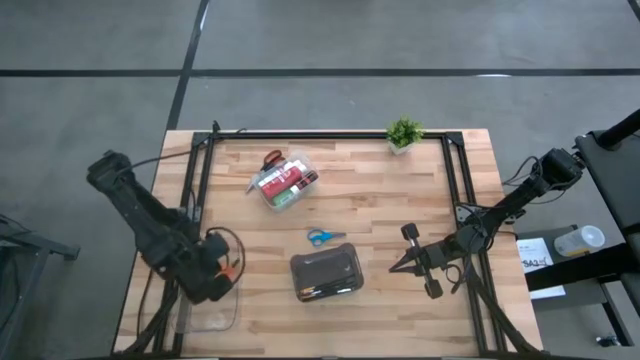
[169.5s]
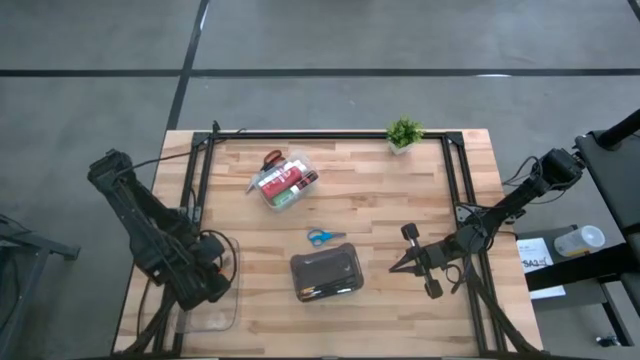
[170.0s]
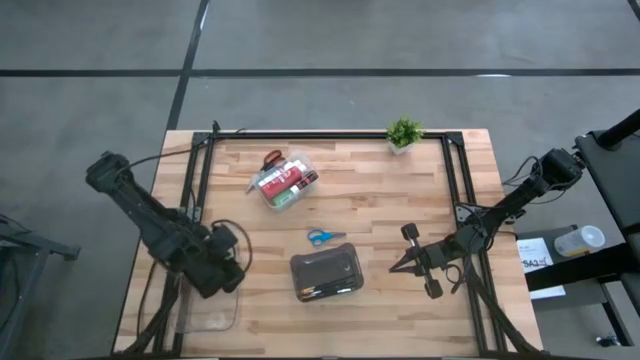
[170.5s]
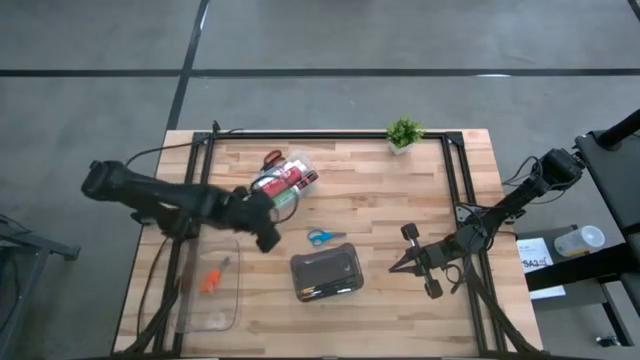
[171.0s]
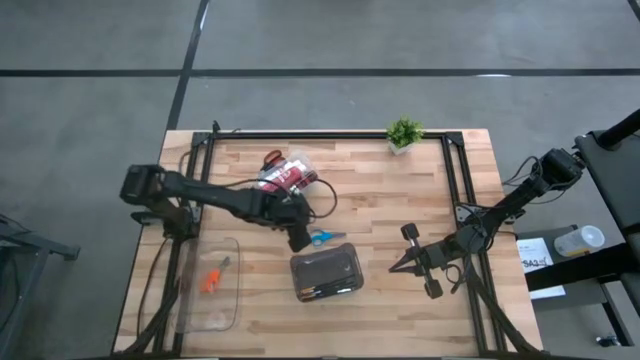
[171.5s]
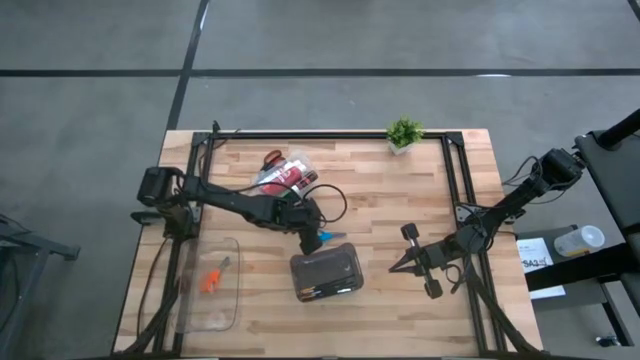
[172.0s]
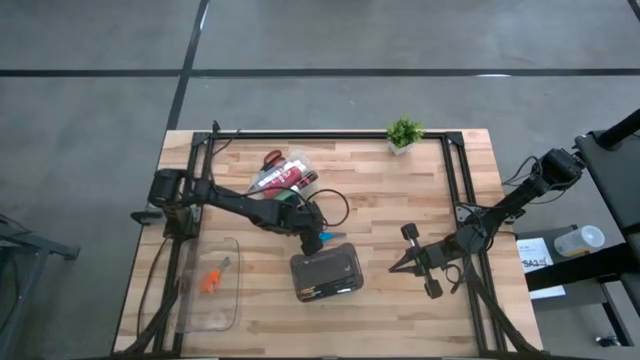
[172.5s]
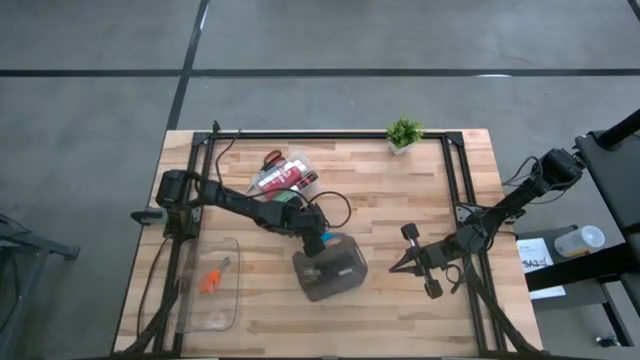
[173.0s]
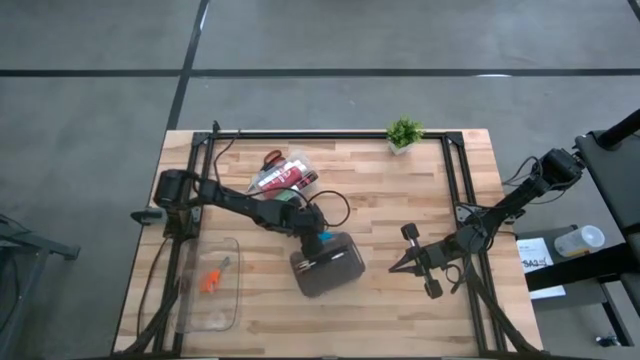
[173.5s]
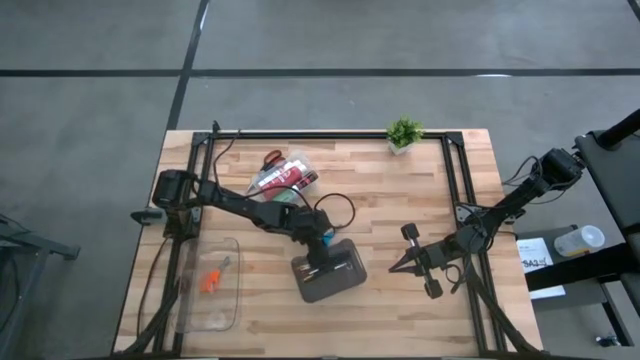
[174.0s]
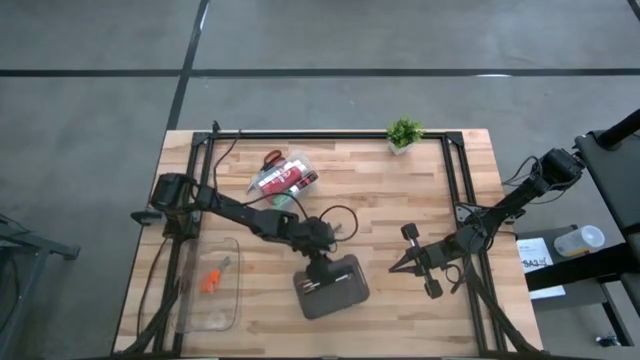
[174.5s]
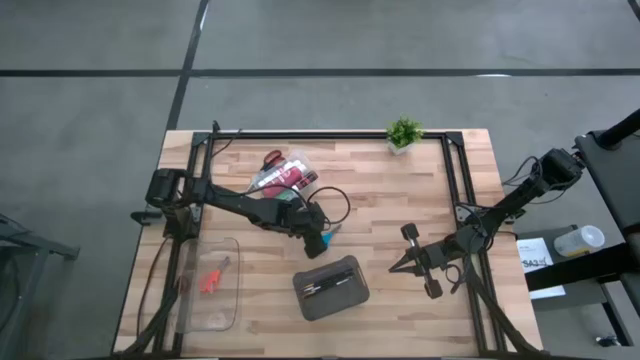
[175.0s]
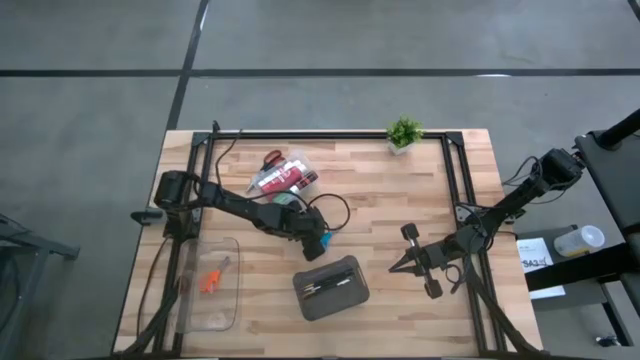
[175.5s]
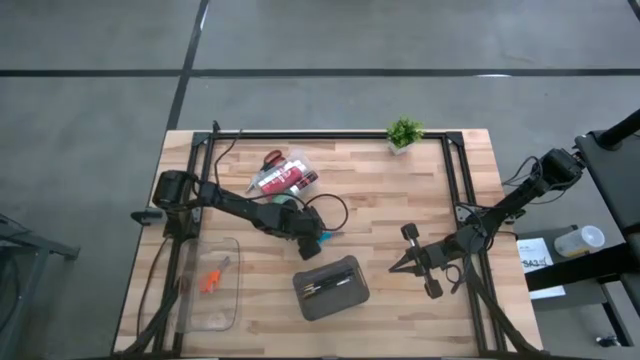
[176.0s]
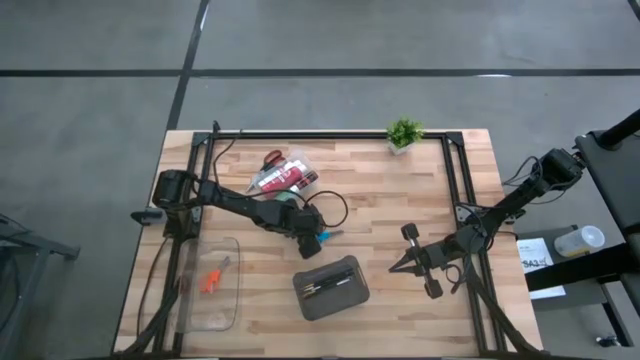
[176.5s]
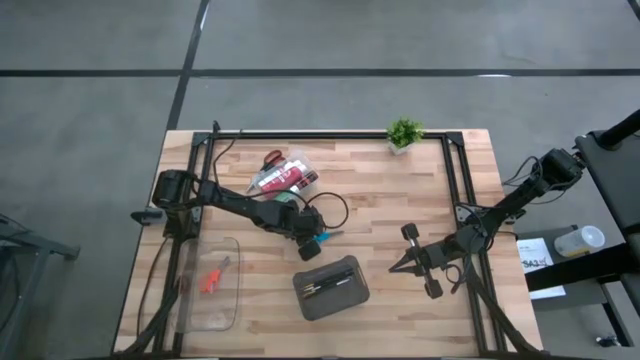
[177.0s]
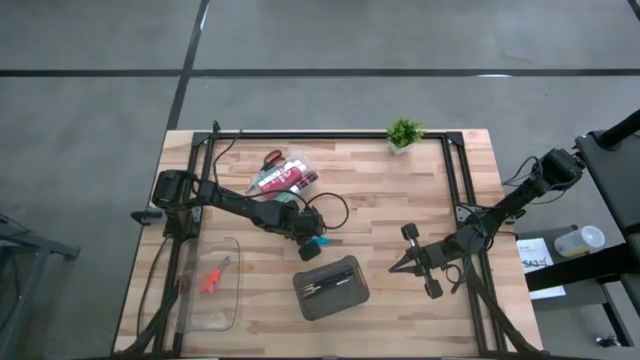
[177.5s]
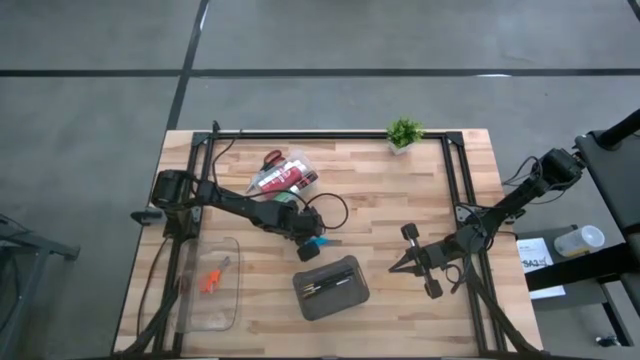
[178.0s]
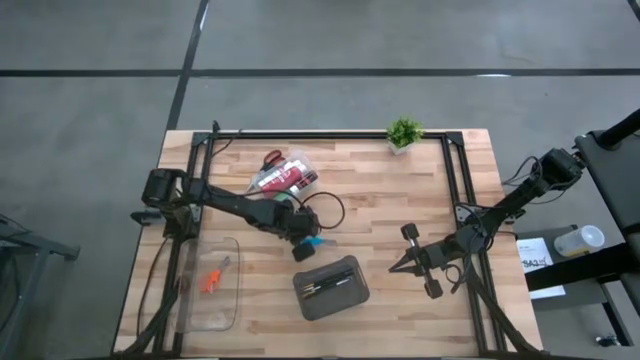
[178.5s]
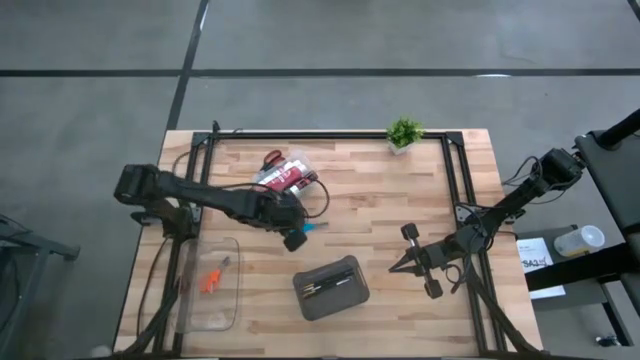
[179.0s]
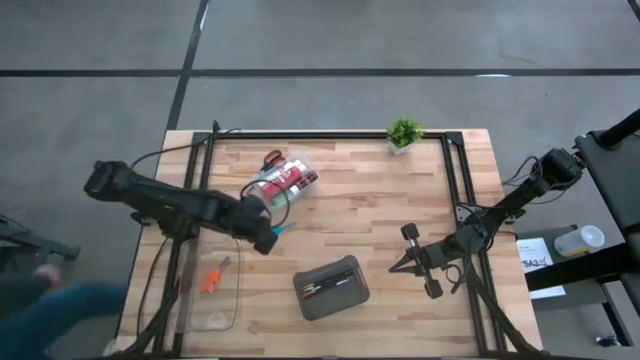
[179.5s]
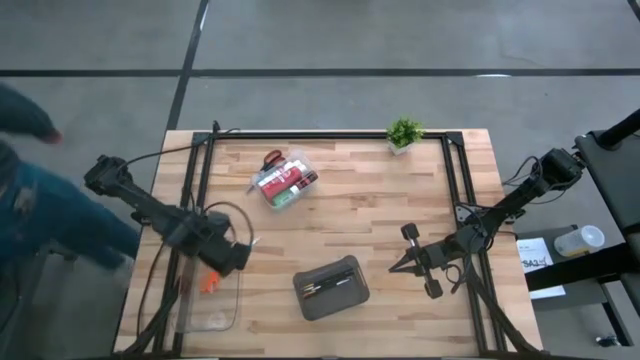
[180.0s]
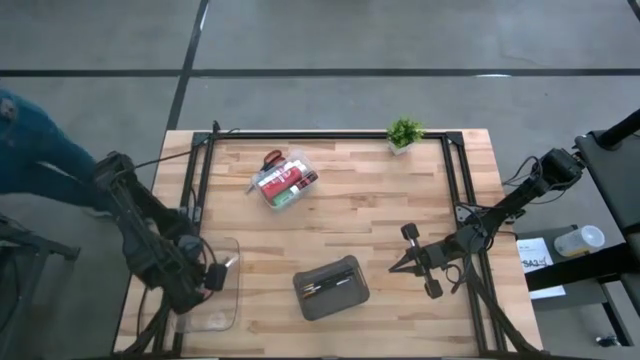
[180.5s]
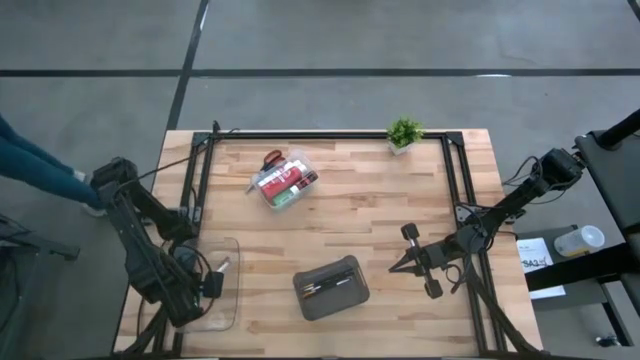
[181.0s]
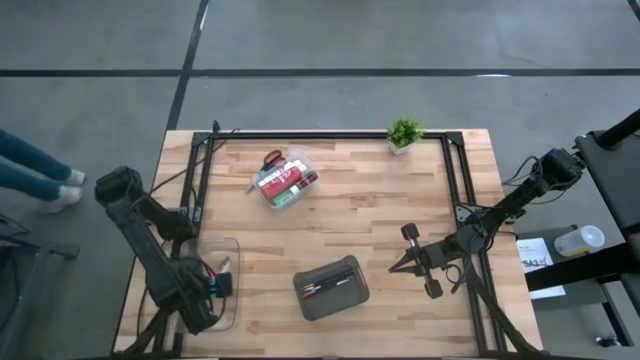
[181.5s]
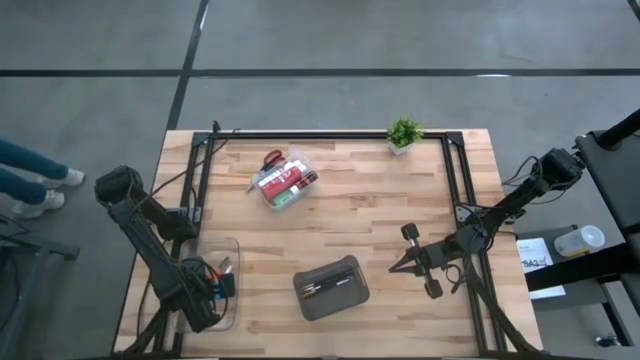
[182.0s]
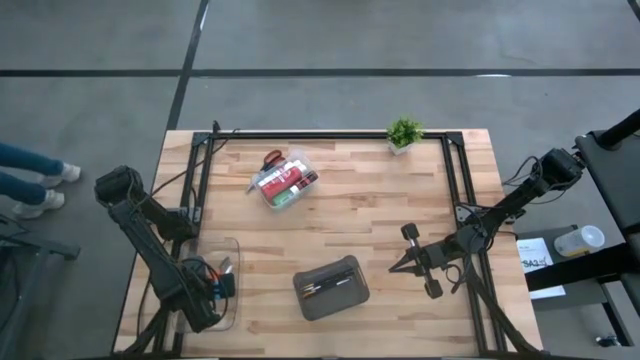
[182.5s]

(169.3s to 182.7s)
Task: Pick & Place Paint Supplies
Put the blue scissors into the bottom transparent bin

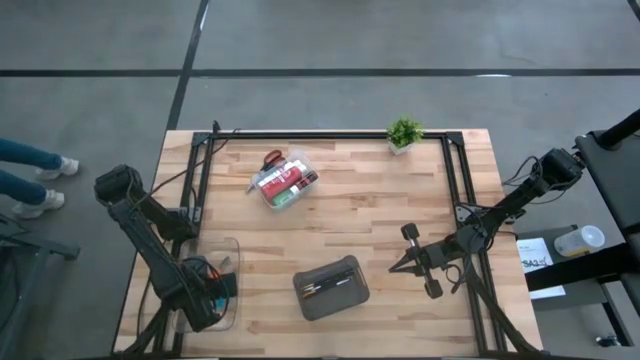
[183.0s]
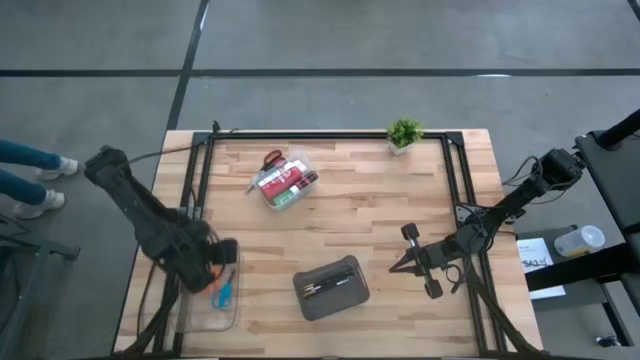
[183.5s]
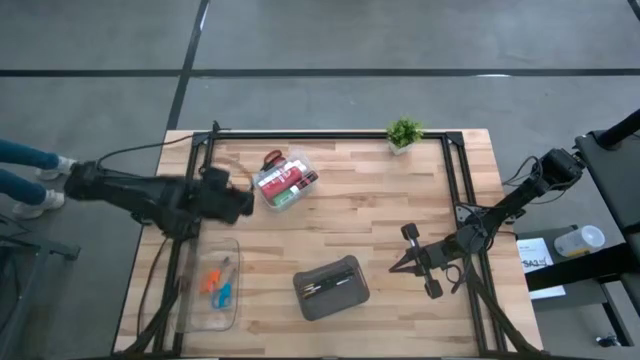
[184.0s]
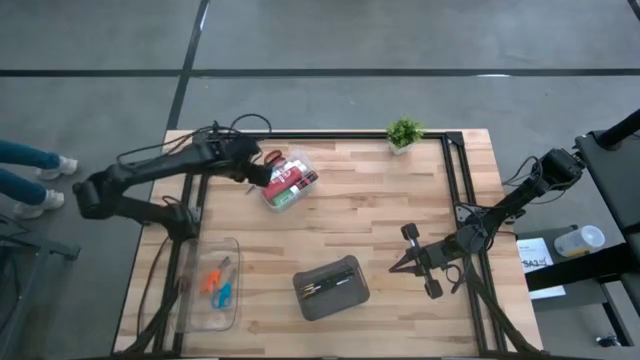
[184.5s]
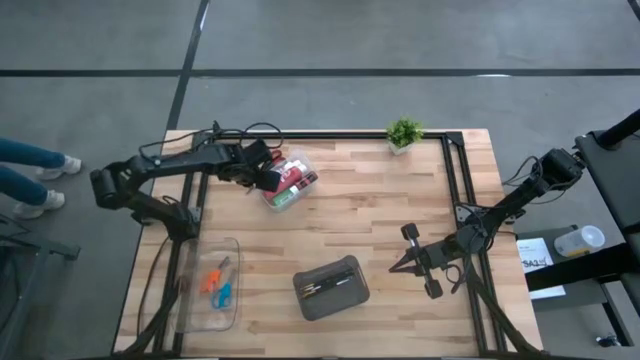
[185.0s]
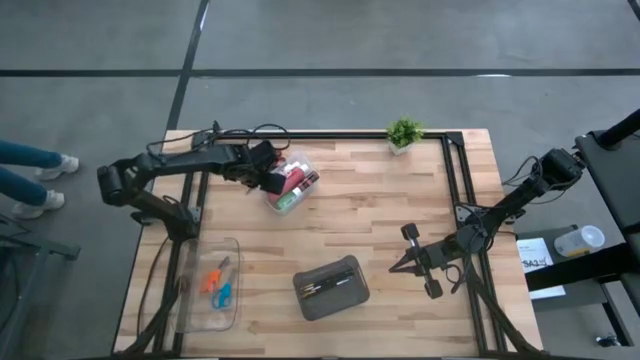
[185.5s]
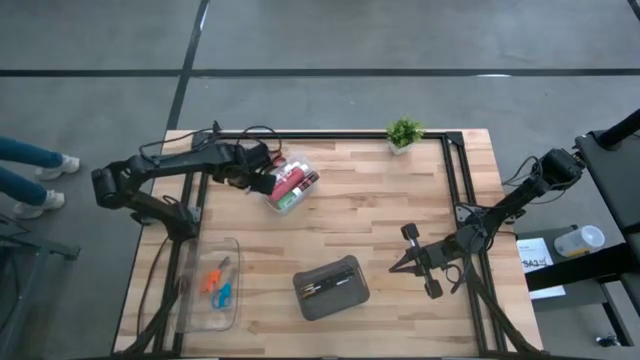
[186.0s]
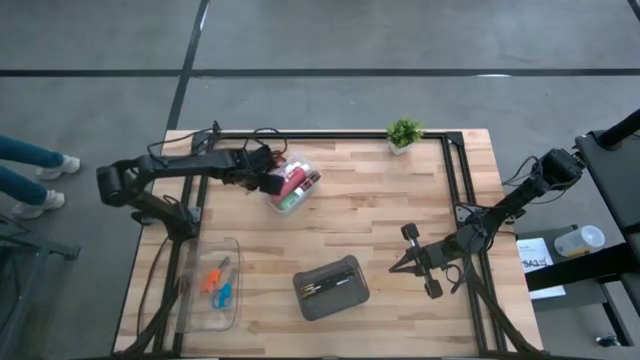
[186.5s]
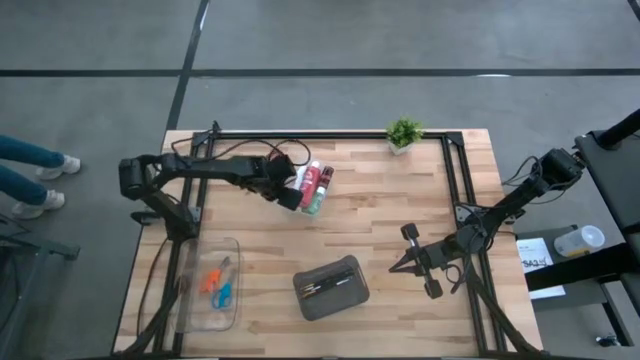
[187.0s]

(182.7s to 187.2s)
Adjust the top transparent bin on the table

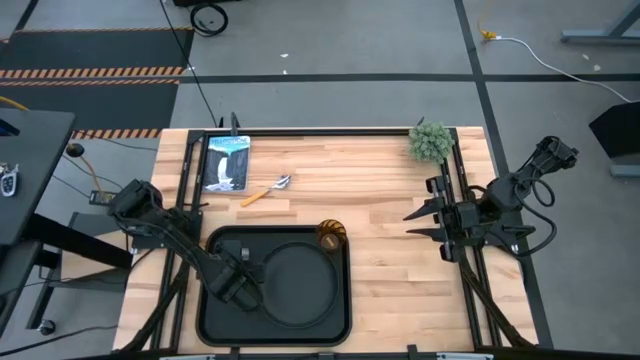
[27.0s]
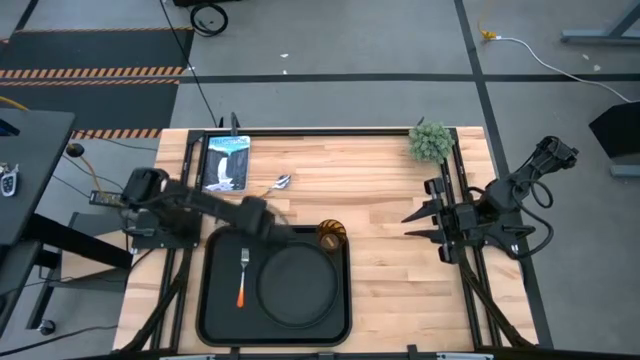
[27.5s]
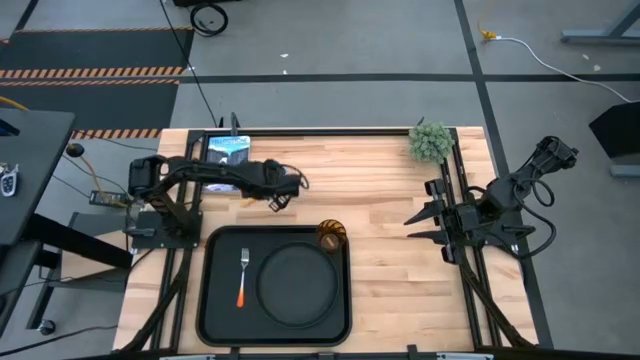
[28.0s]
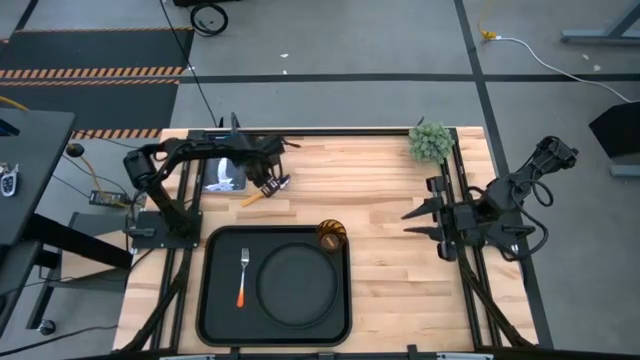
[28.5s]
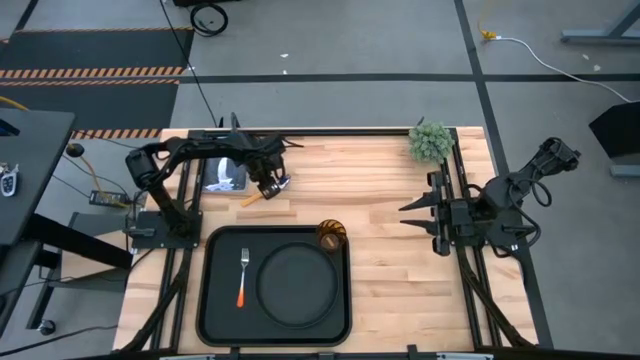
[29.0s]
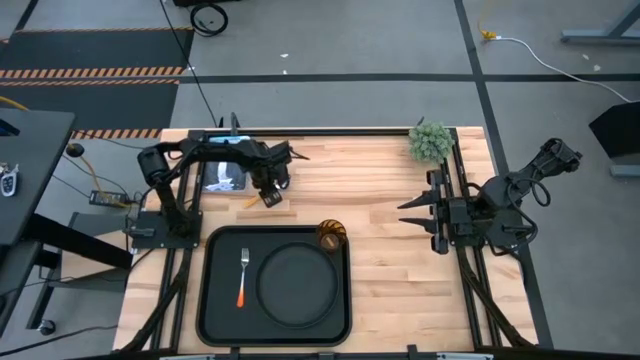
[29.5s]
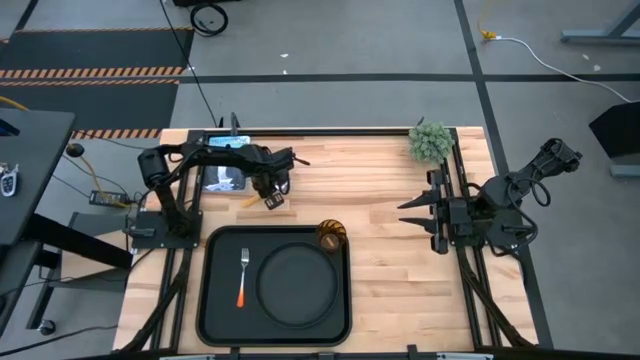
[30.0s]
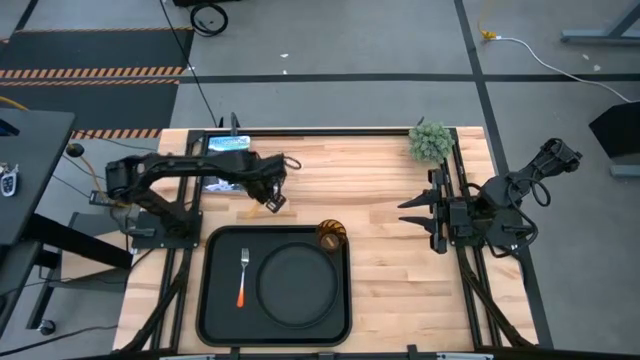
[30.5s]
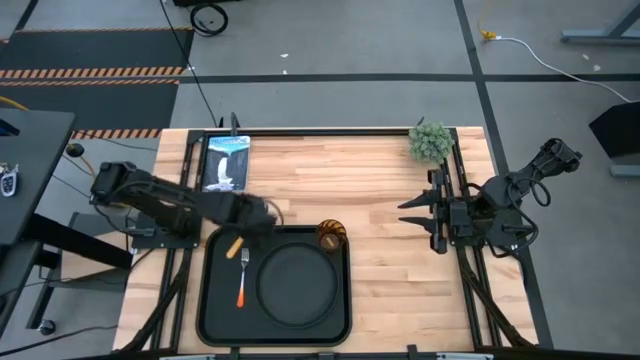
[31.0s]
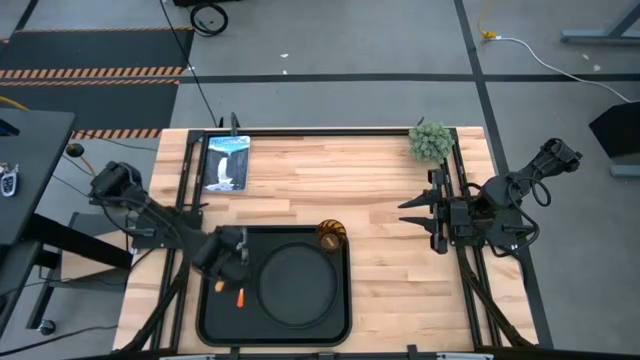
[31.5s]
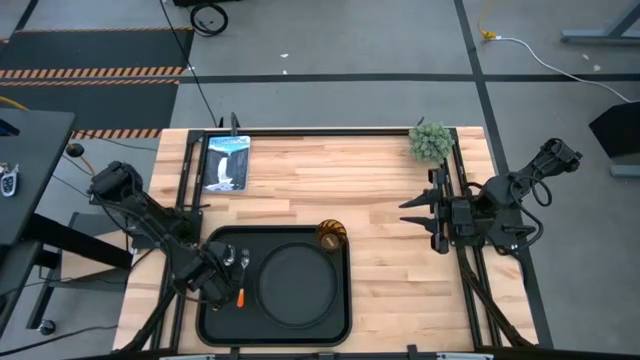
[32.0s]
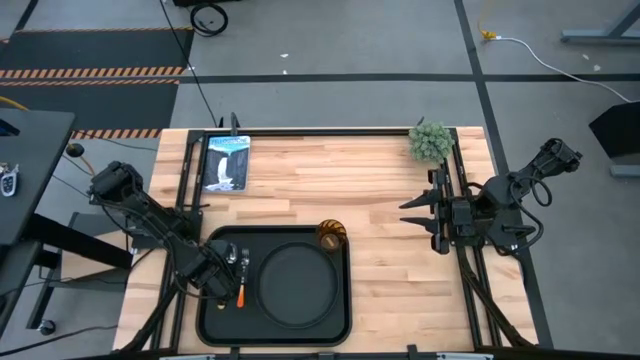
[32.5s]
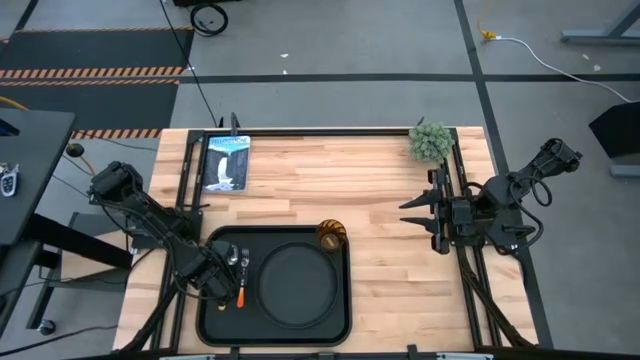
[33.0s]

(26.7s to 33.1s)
Task: Pick and place plate/cup/fork/spoon on tray
Put the yellow spoon to the left of the orange fork on the black serving tray
